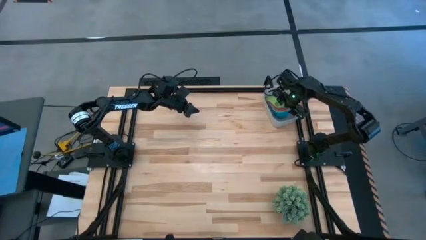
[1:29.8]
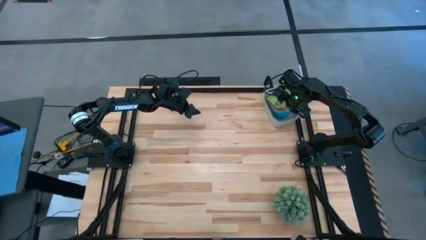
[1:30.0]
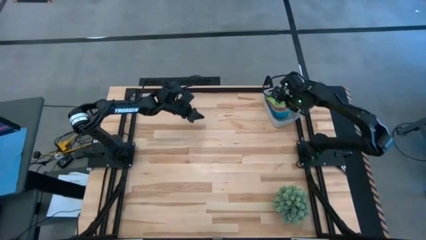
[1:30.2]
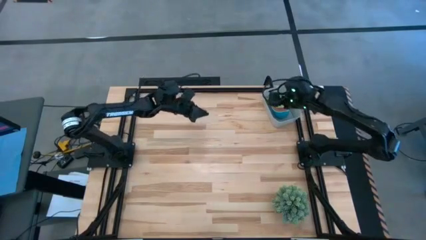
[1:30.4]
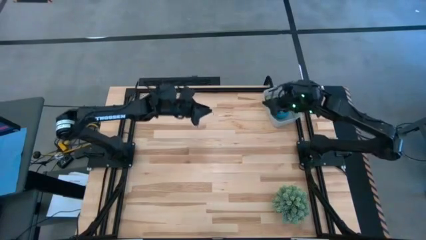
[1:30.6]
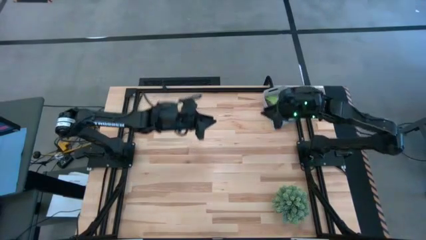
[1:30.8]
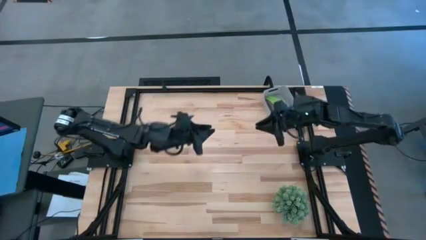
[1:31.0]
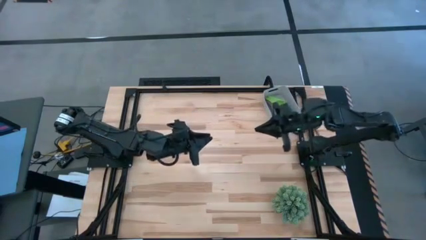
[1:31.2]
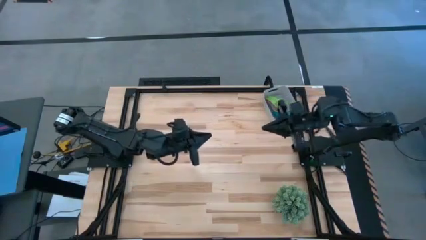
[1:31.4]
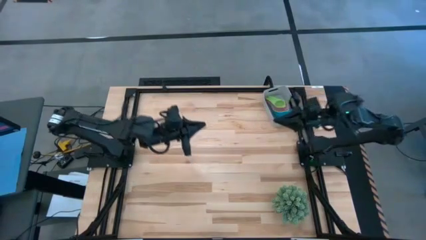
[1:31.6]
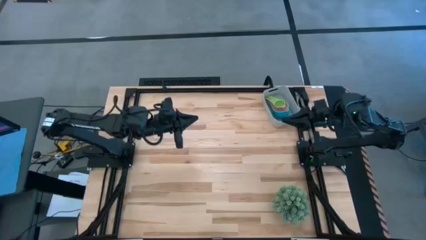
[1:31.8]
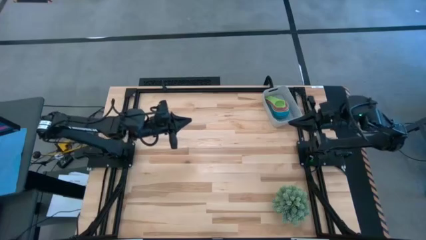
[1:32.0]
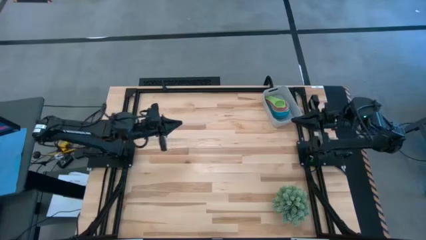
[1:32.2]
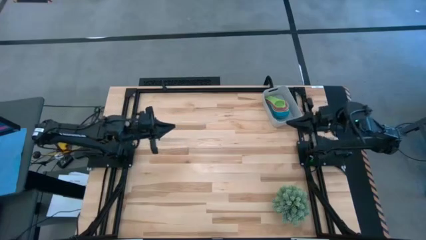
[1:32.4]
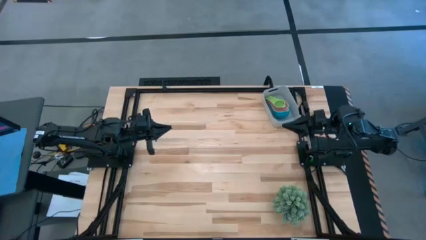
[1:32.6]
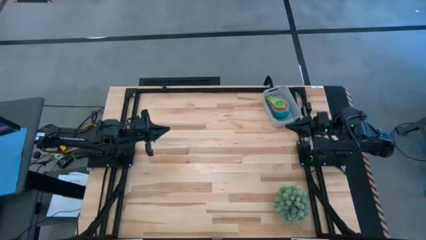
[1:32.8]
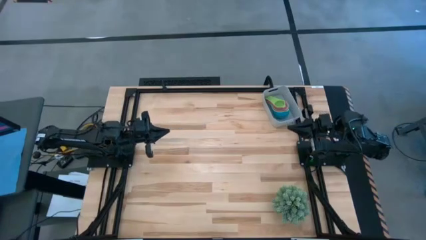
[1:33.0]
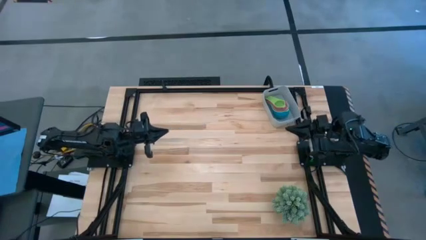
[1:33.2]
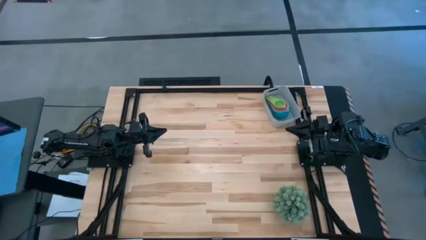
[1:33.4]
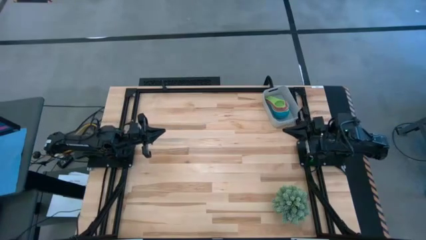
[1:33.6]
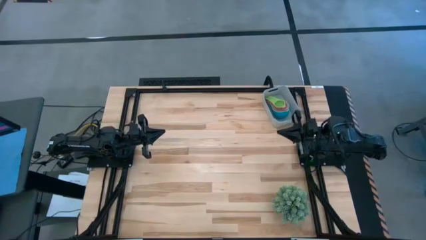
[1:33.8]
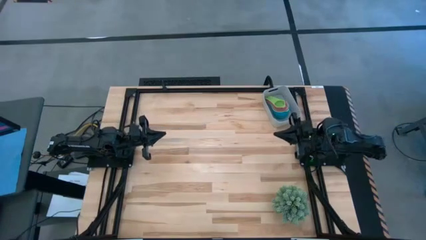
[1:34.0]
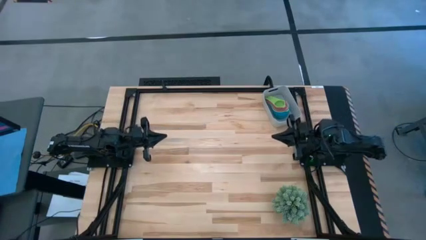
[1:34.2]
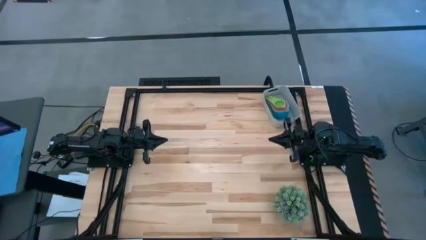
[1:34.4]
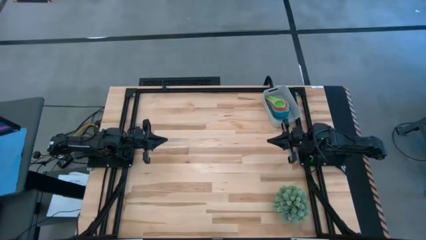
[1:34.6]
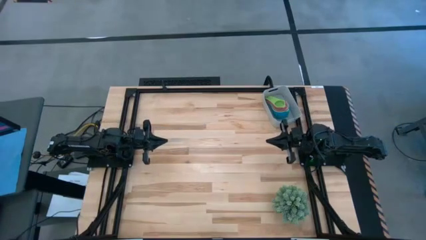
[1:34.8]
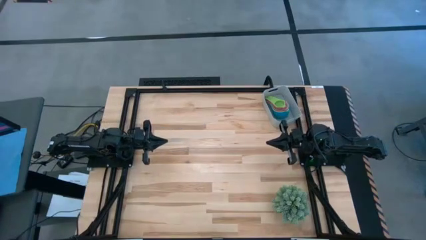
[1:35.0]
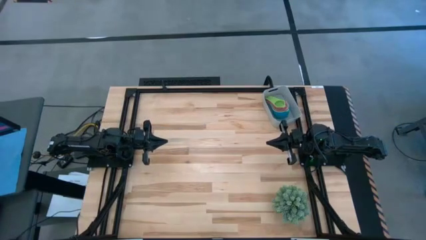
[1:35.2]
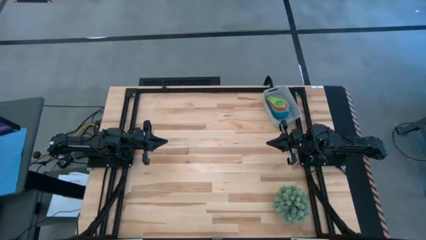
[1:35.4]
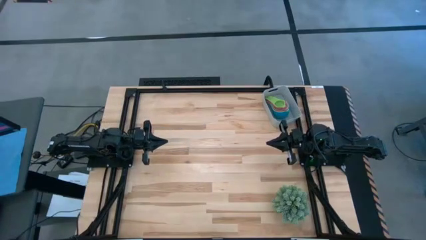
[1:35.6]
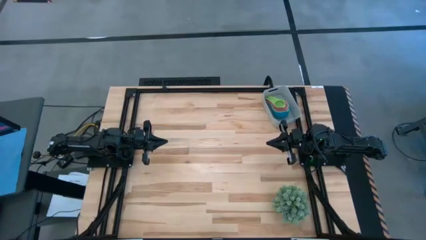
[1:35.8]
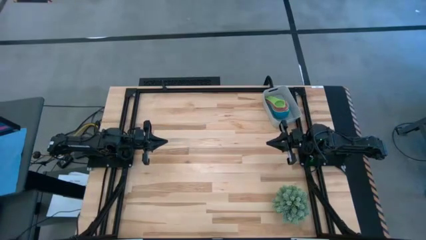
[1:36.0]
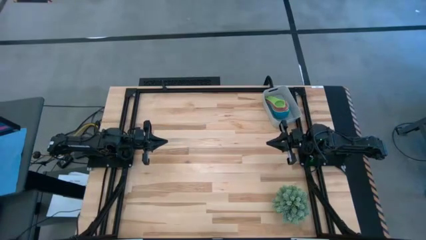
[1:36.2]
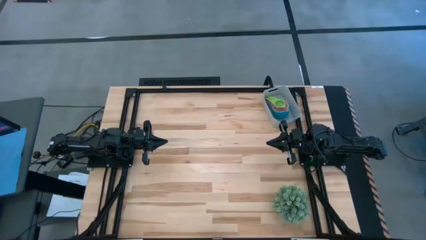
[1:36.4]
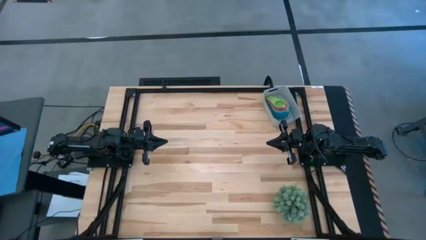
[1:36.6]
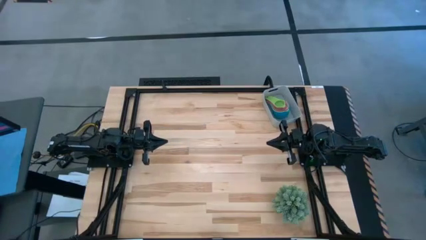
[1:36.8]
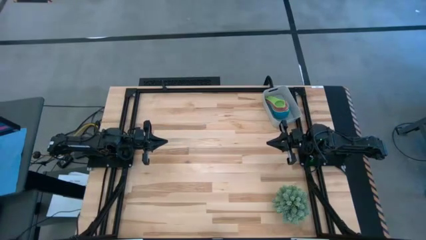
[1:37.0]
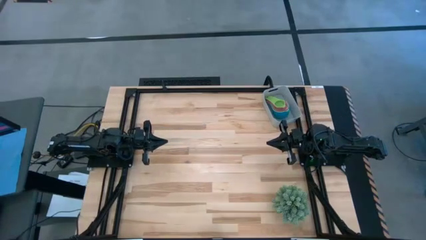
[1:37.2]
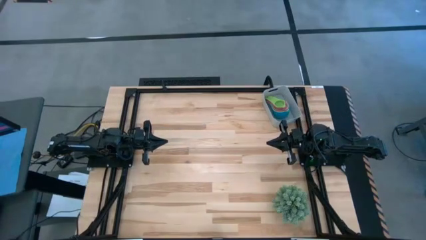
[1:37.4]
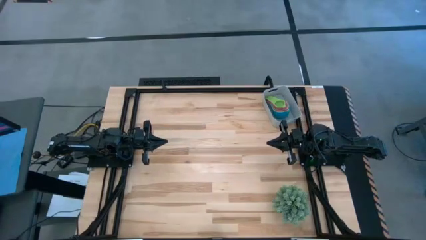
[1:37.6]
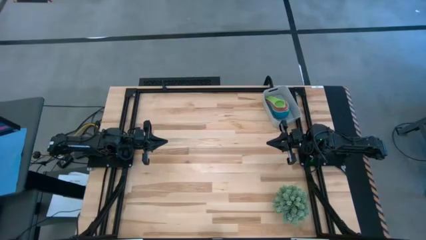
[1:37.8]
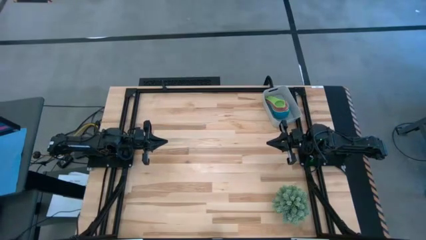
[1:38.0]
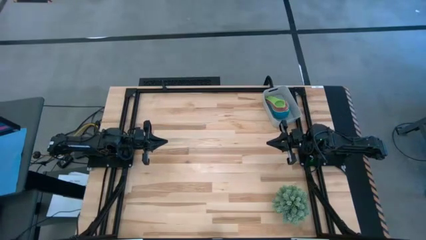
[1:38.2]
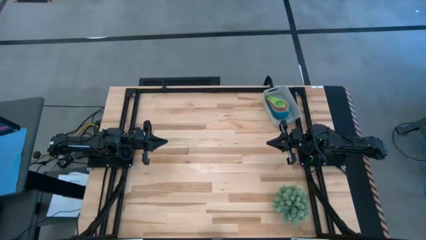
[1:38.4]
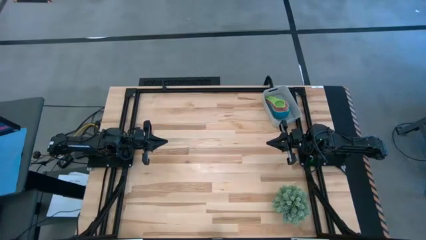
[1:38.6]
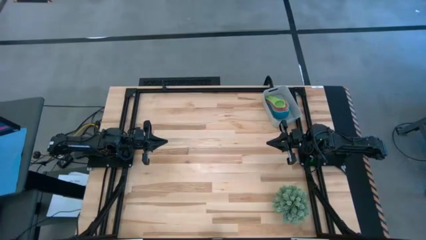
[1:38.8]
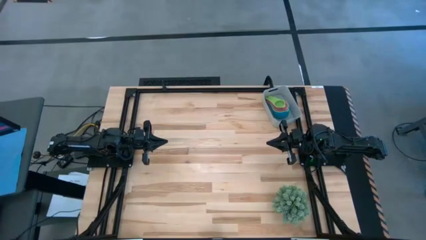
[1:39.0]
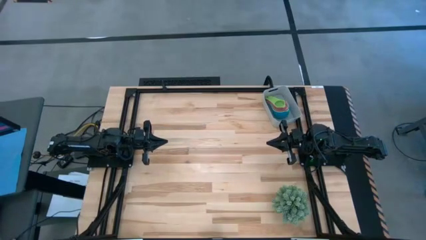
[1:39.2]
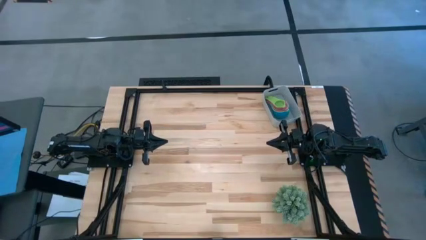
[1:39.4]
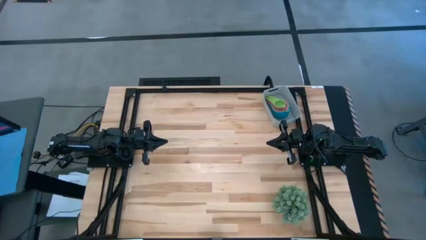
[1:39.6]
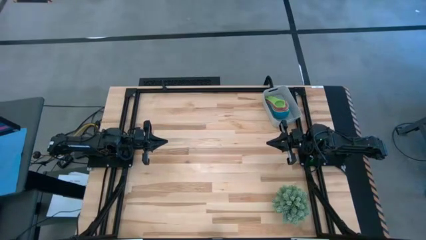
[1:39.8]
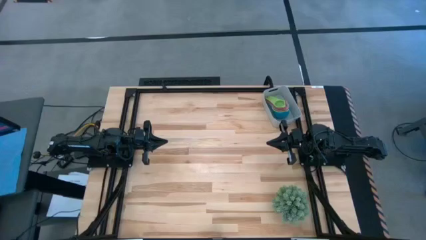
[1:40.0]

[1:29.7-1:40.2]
Task: Nest measuring cups in basket
Return to Home Position

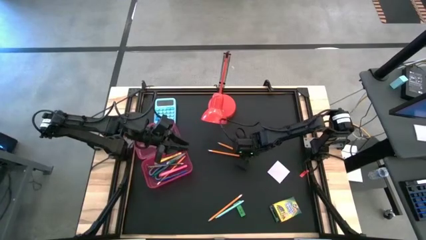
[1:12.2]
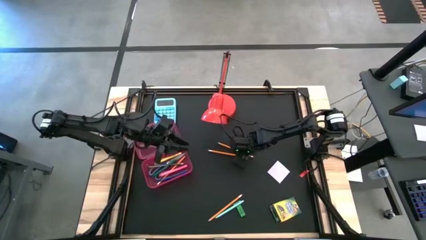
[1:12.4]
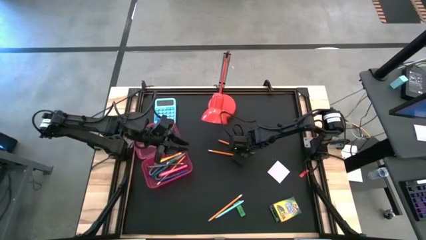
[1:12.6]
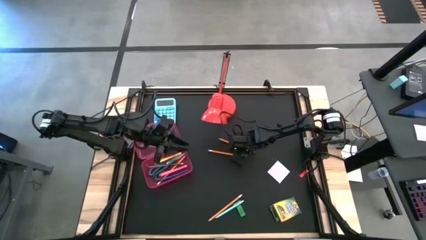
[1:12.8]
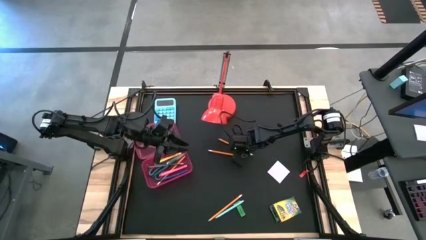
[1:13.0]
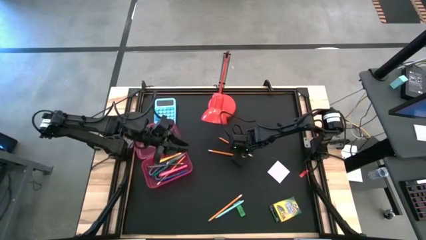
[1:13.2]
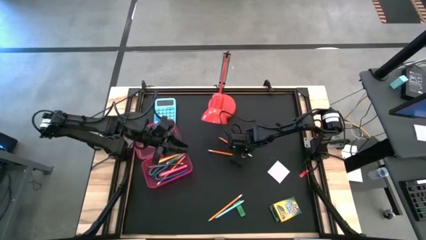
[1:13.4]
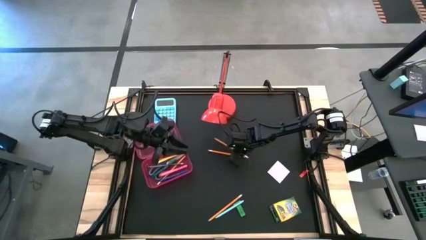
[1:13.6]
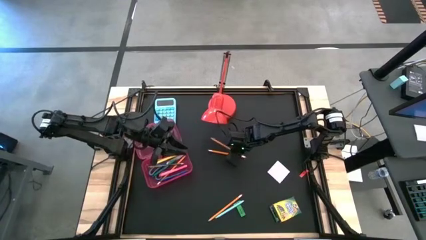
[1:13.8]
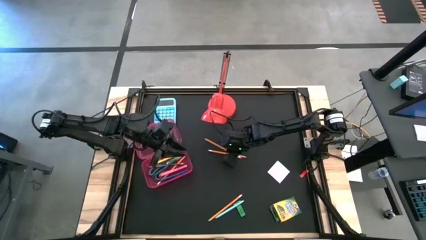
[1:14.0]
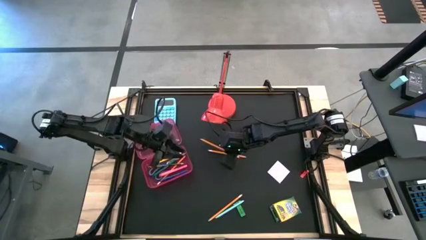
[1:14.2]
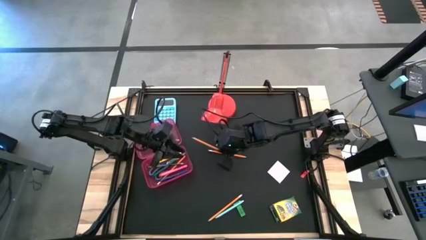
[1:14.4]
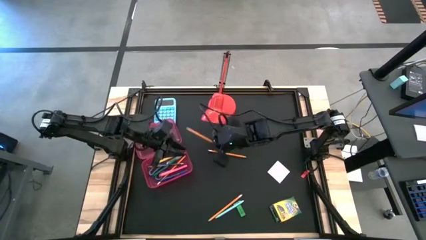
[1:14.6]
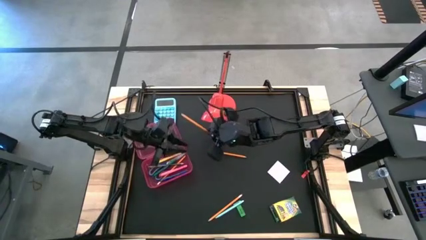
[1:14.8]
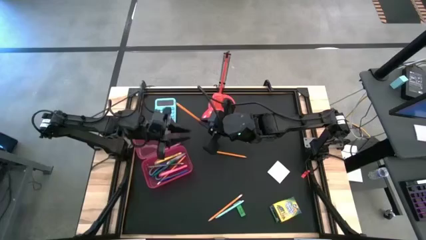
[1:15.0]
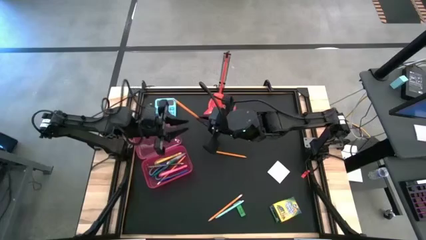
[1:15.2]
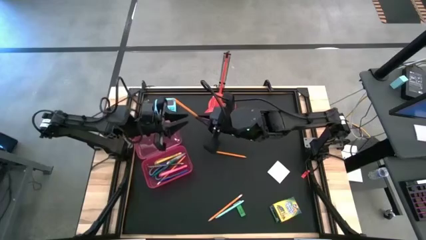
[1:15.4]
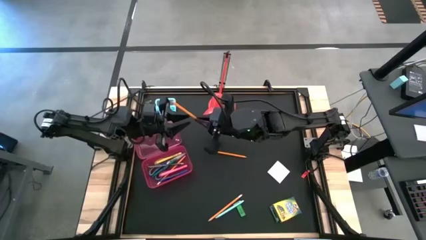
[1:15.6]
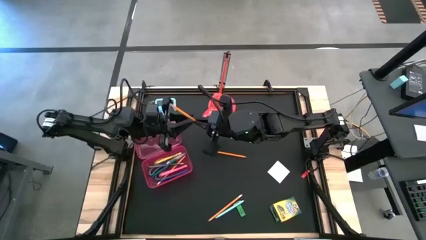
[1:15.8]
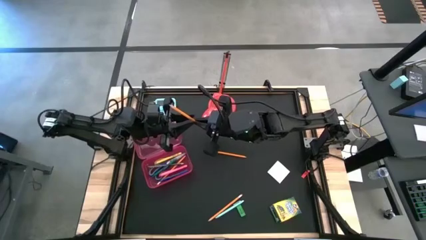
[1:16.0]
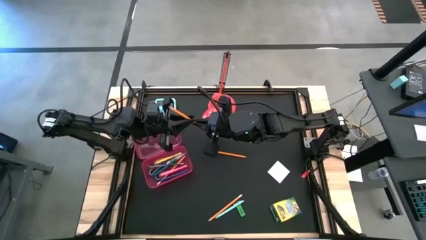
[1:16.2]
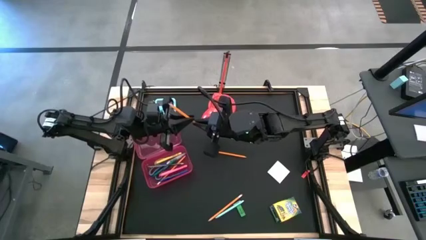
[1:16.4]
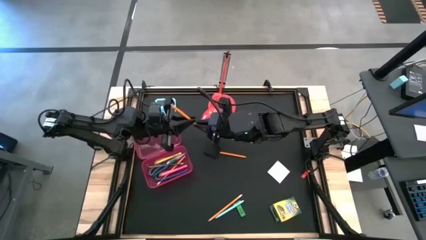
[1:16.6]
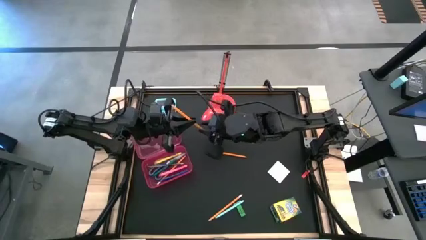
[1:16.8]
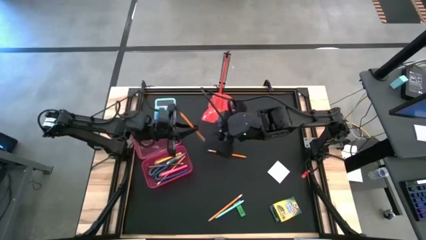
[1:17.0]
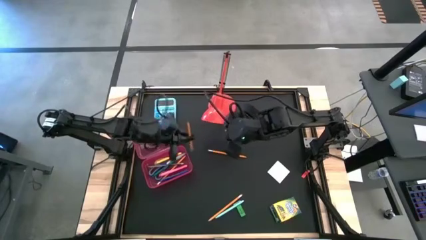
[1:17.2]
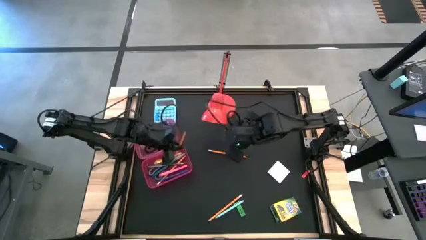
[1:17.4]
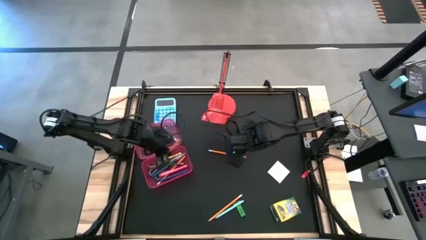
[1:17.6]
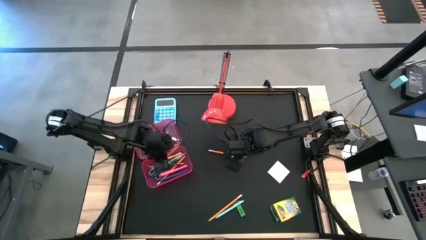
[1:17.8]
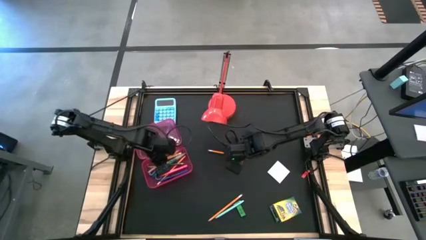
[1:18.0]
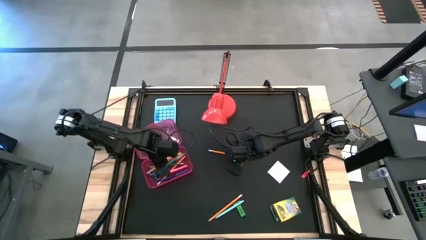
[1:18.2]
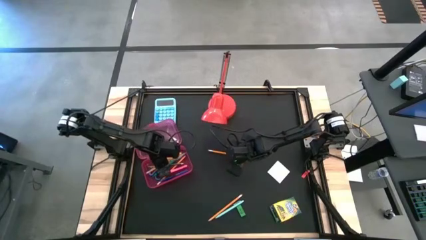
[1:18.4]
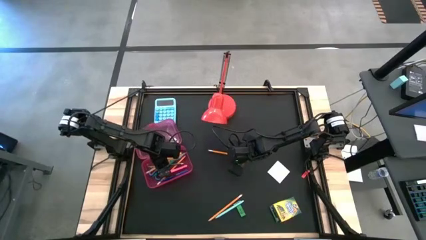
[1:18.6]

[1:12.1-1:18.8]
Task: Pack school essentials
Put the orange pencil into the red supply box
